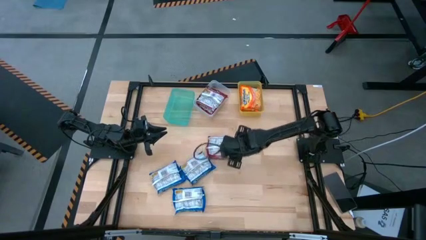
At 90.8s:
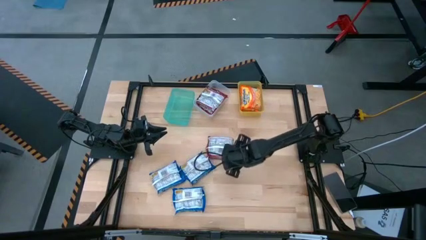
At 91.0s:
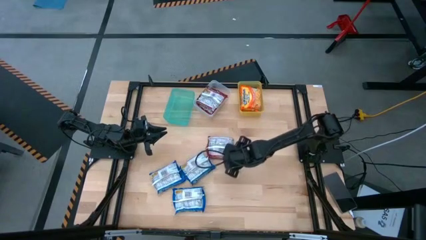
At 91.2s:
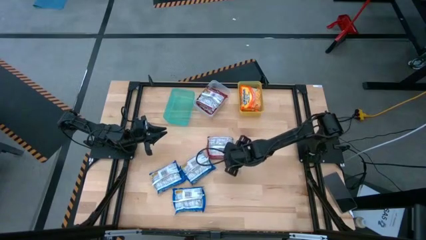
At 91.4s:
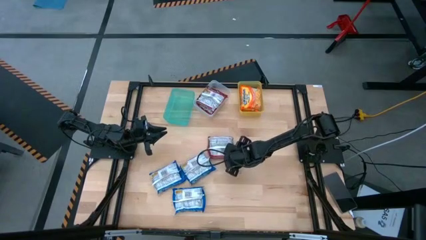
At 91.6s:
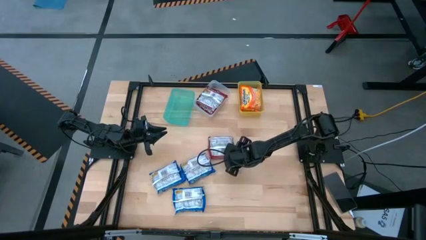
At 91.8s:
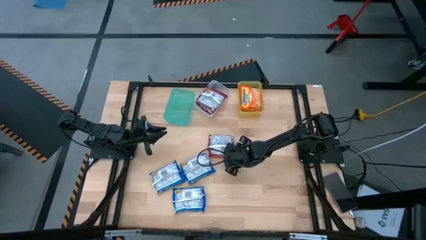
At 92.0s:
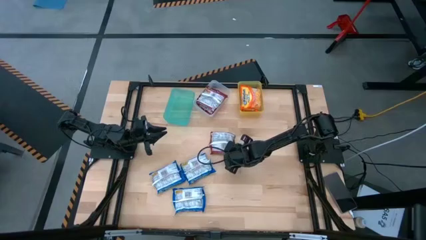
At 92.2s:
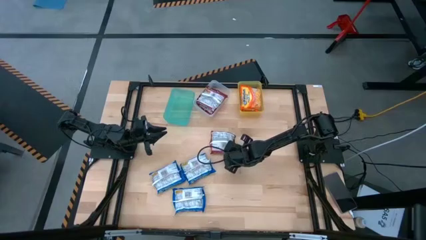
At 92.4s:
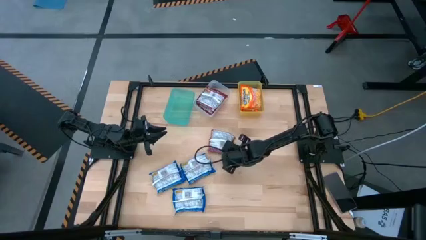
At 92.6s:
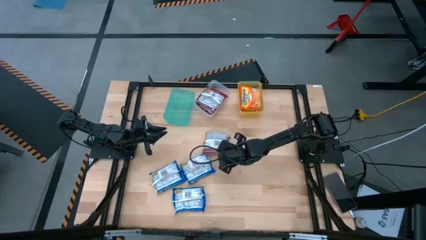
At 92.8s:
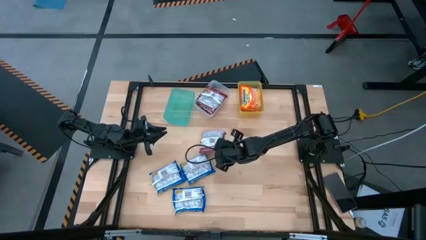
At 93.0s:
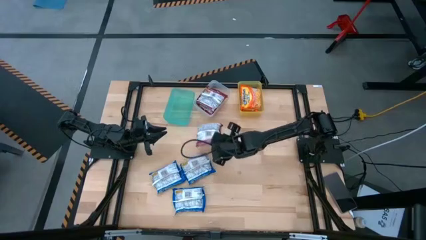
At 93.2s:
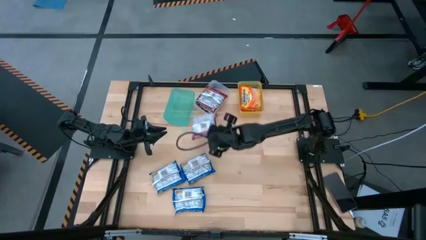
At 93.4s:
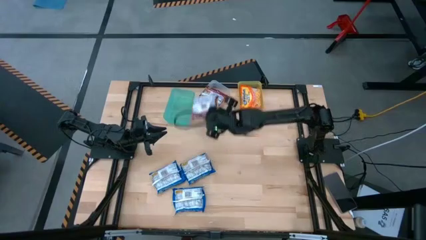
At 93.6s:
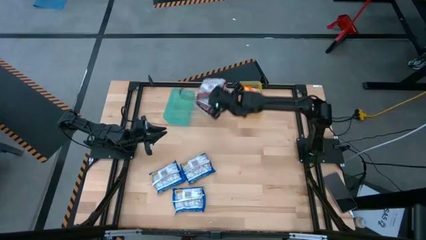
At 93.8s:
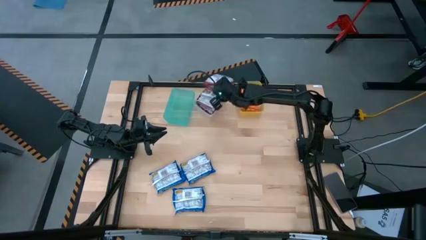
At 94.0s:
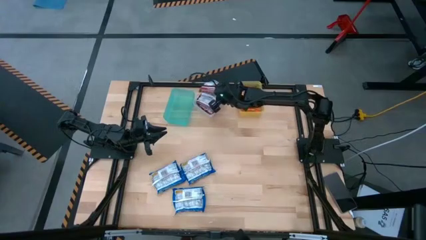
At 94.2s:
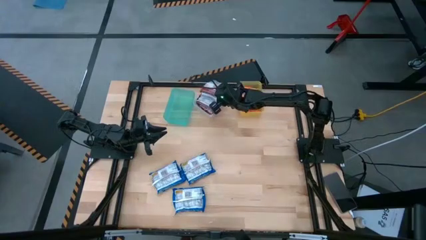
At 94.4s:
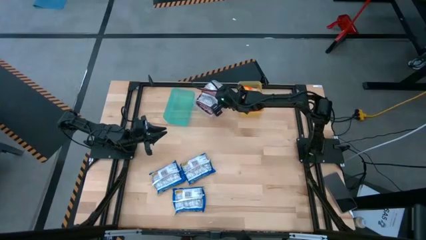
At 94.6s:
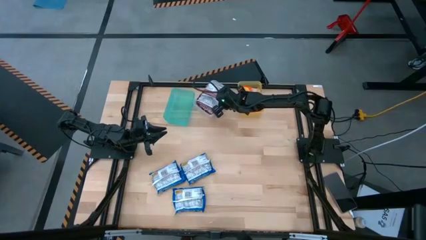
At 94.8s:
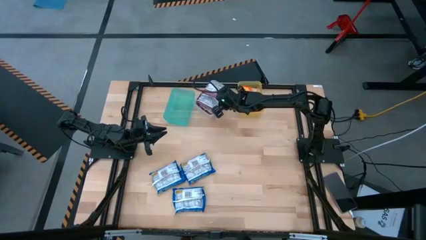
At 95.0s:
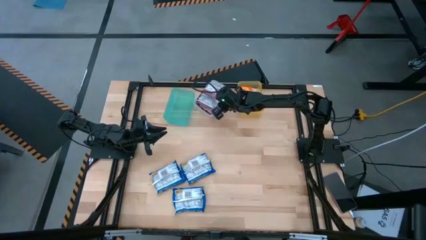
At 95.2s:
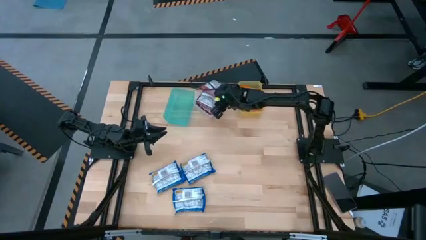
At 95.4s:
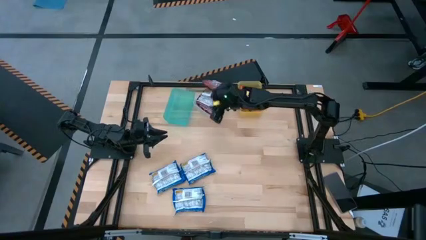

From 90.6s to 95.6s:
Task: Sort Maruchan noodles
Put the red noodle pack into the transparent bin

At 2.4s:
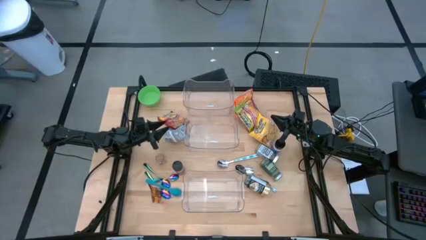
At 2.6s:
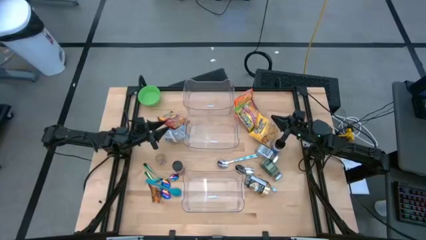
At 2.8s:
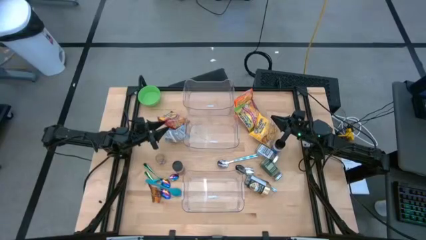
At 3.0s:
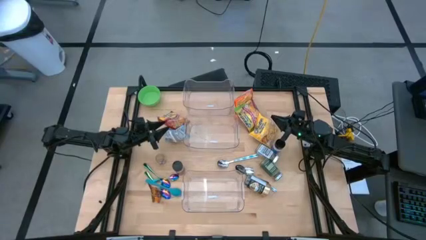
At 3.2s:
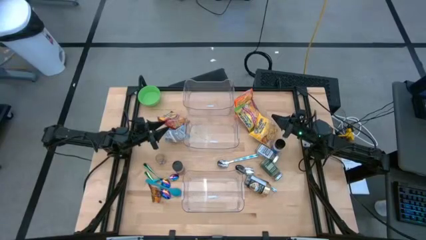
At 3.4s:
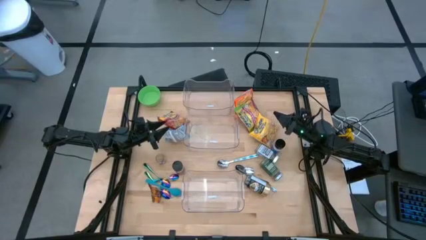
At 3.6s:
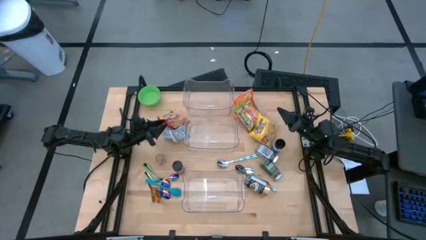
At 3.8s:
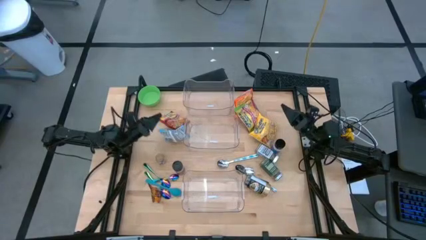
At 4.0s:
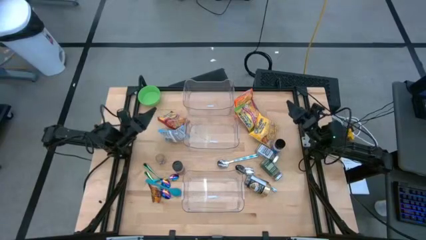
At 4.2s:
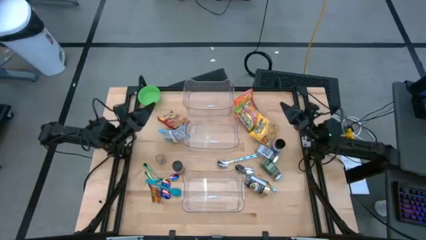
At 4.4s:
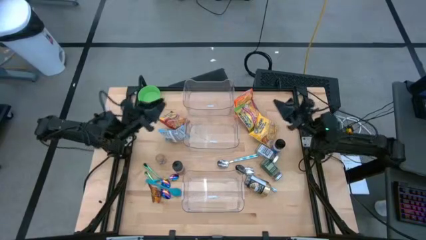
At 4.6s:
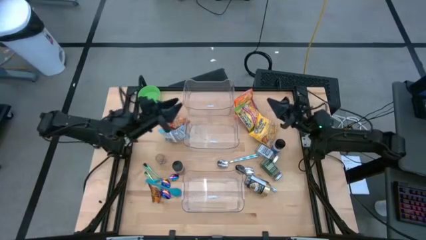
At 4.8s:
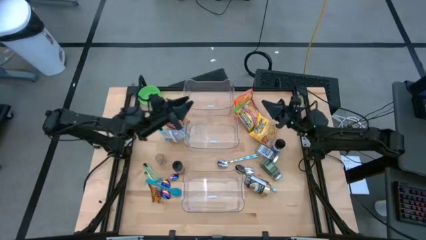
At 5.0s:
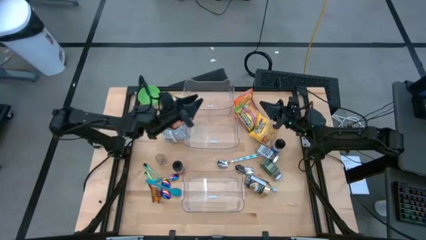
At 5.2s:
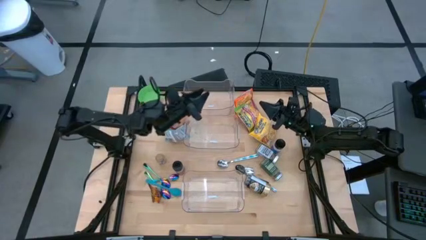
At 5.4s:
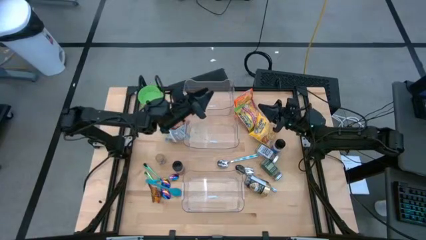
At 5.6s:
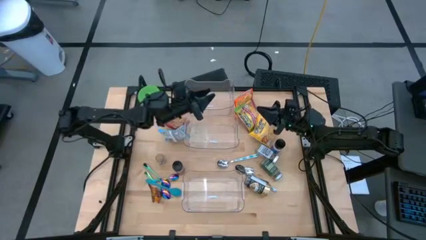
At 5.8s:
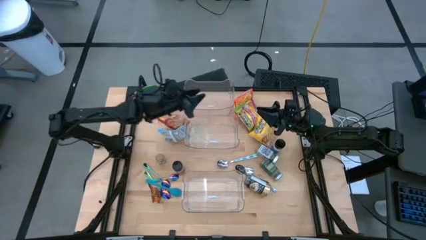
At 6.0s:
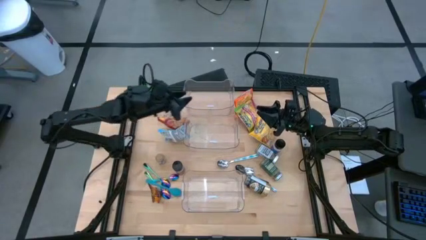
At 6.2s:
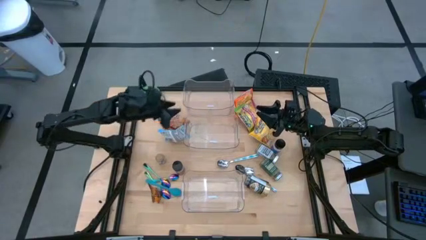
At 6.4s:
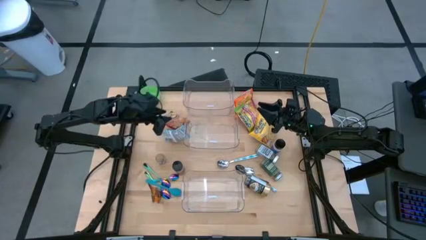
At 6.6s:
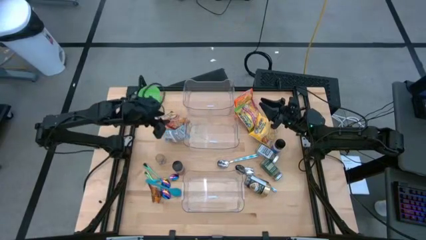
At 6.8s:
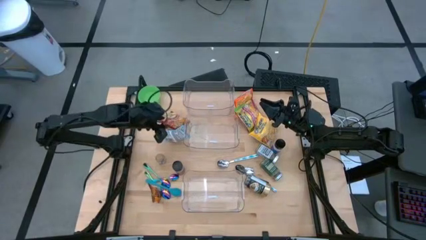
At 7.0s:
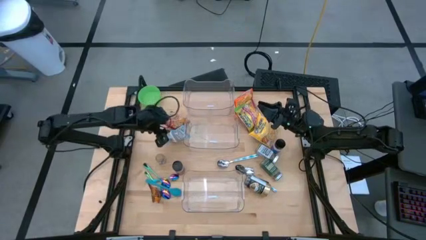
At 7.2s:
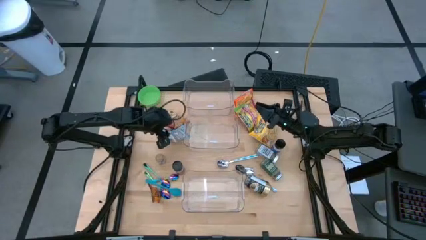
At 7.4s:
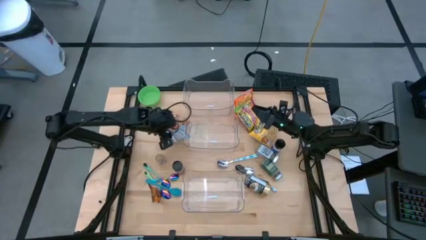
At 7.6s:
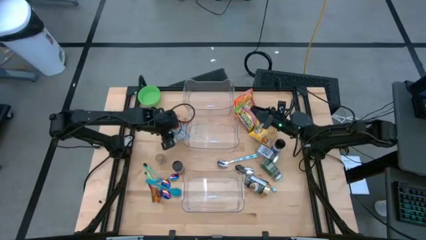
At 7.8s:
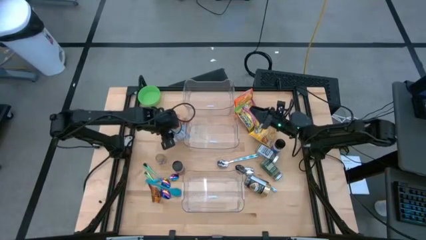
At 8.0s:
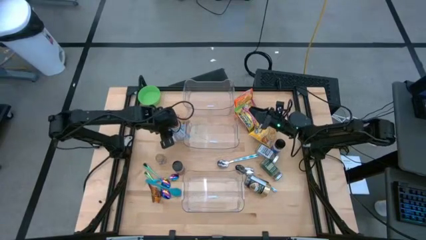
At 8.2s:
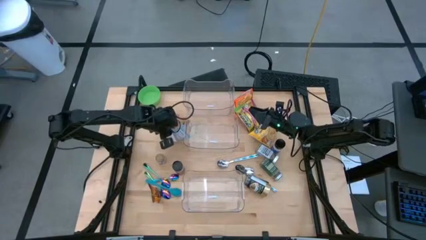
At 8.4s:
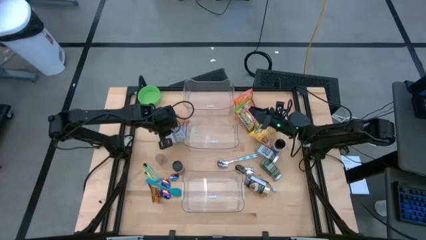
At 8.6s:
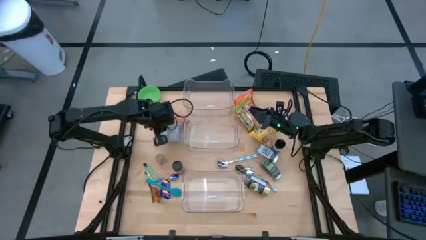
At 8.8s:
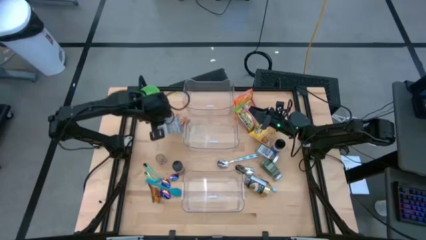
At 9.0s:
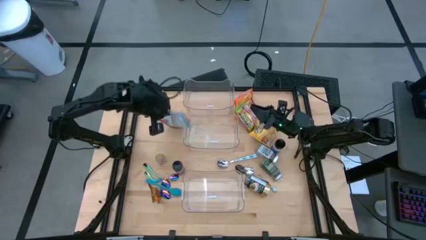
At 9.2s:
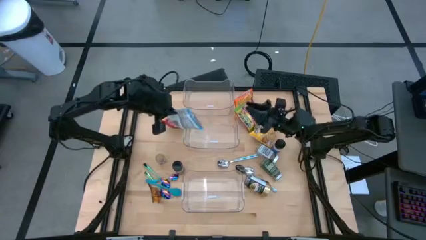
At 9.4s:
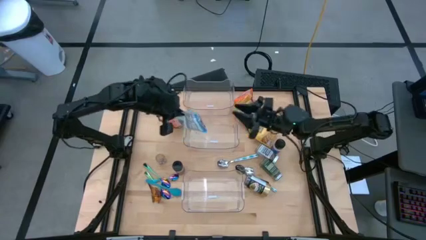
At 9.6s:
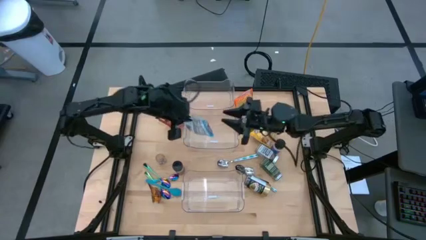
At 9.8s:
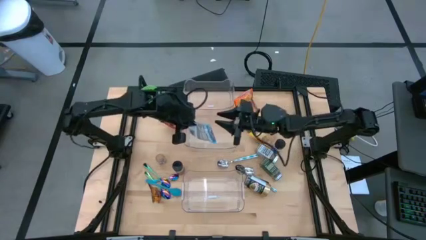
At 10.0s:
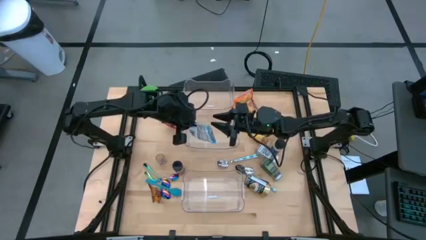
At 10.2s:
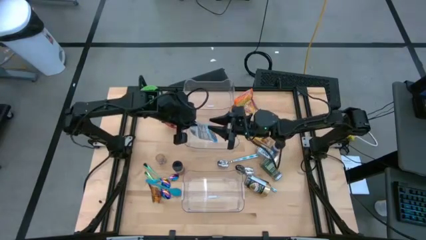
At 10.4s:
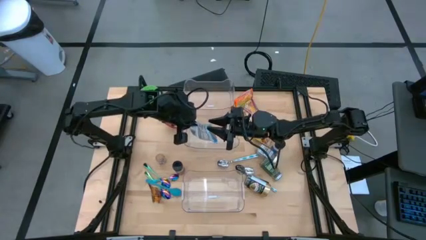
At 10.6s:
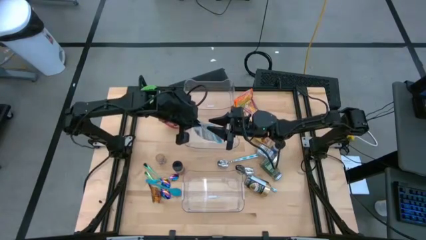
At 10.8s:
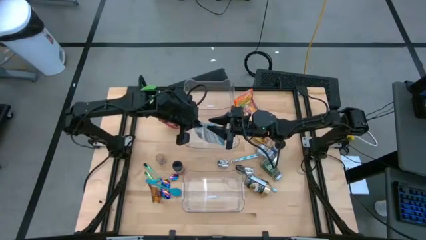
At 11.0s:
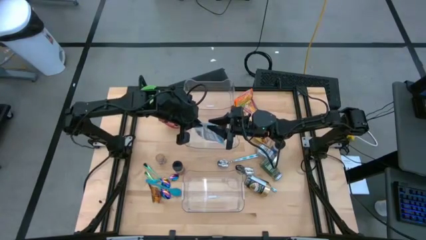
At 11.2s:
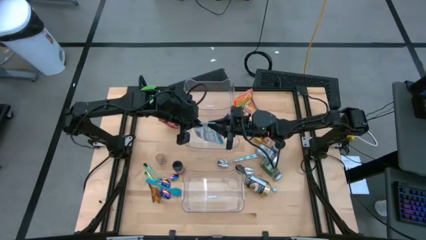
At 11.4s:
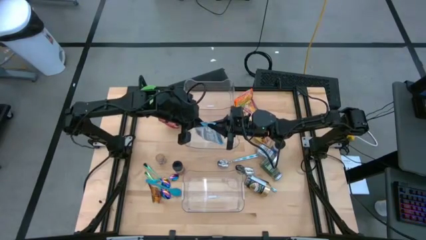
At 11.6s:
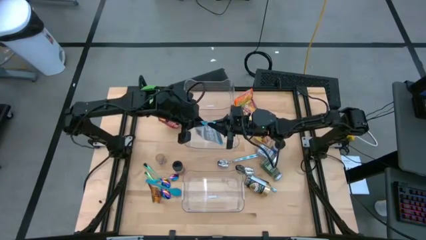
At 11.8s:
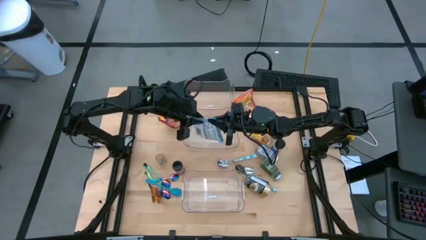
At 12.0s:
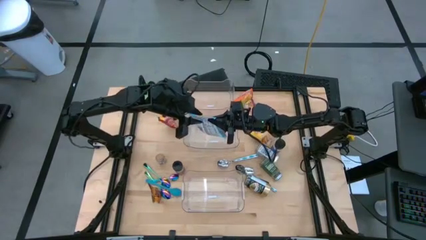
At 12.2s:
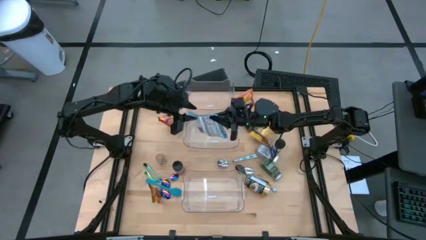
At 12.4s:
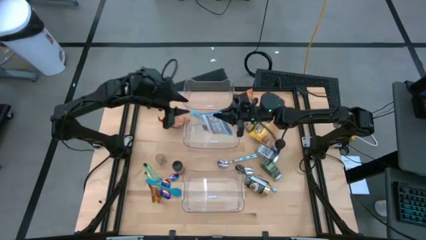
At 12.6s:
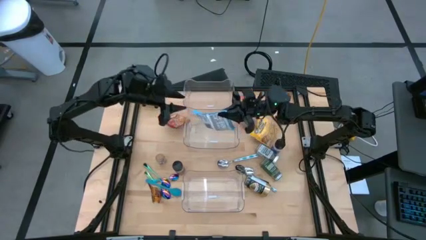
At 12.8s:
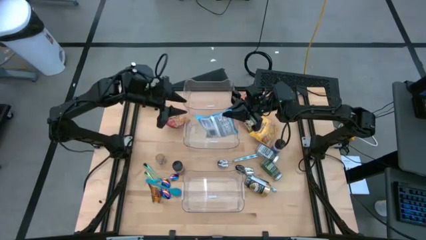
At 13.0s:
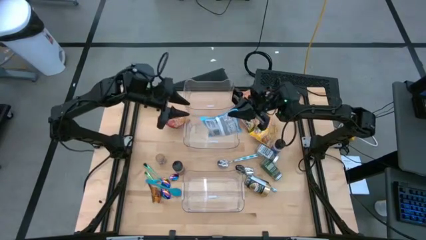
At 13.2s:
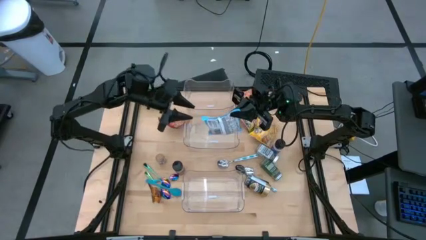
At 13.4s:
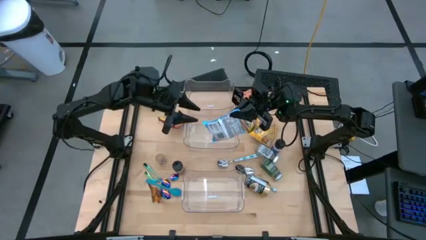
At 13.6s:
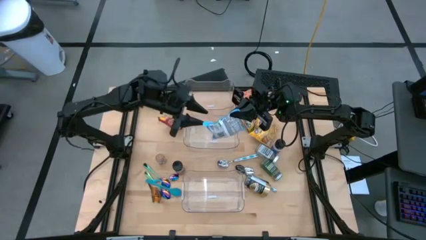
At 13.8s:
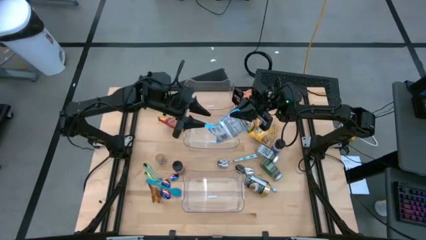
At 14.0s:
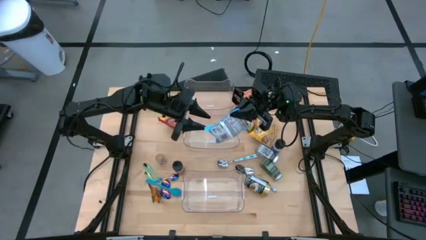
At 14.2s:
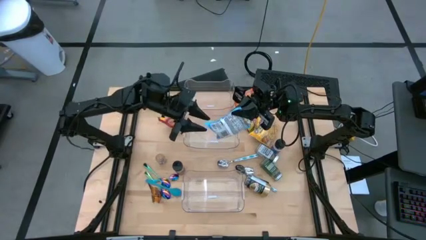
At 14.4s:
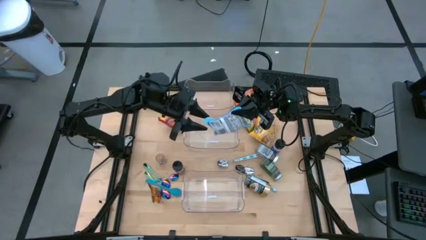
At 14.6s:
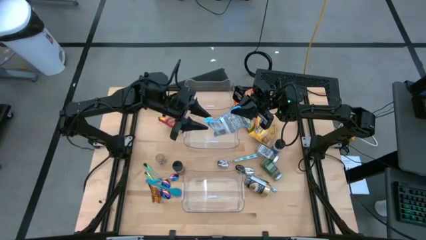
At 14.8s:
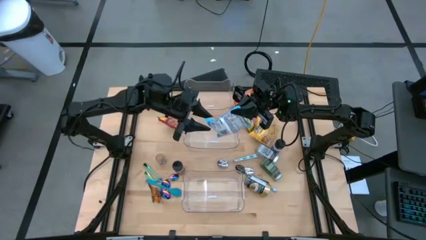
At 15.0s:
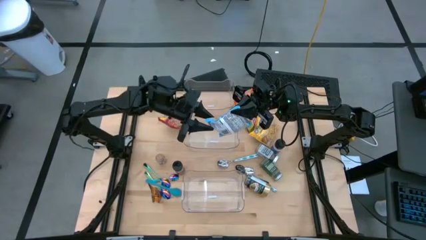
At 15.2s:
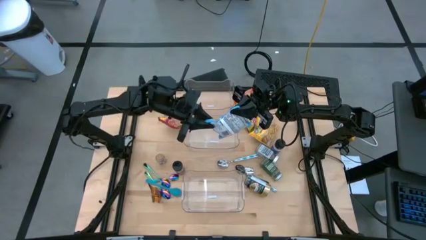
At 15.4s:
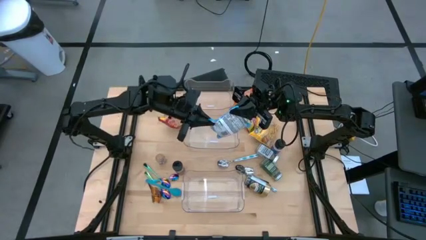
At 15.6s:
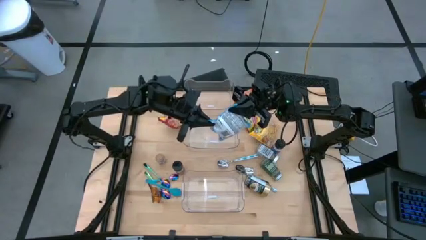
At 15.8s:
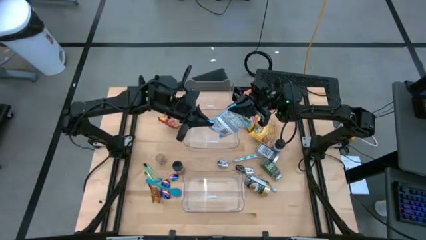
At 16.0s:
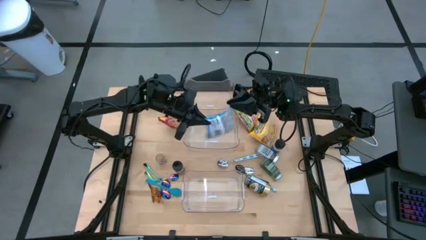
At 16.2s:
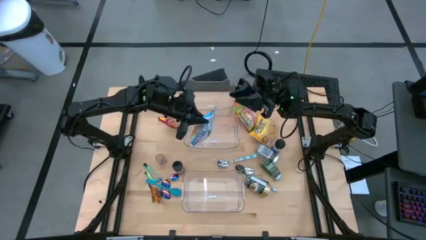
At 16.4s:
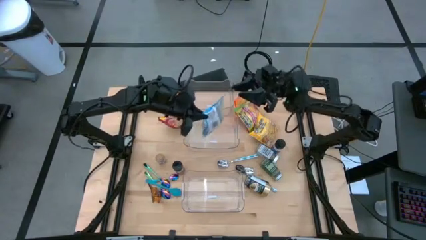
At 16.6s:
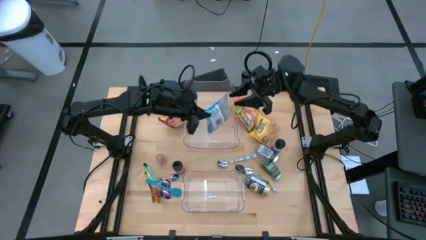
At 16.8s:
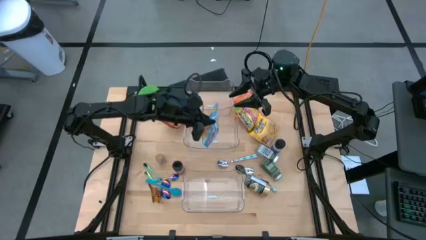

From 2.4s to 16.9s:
Task: Pick & Place Food Item
Put the blue noodle pack into the middle transparent bin
